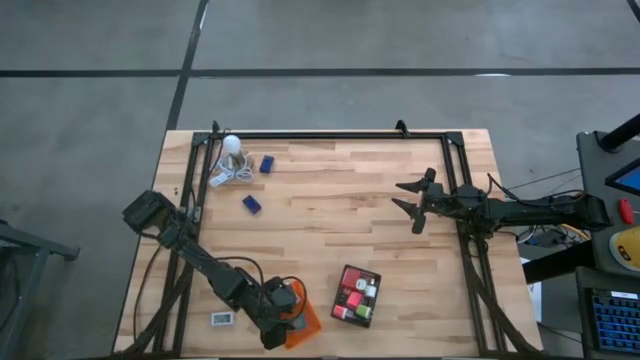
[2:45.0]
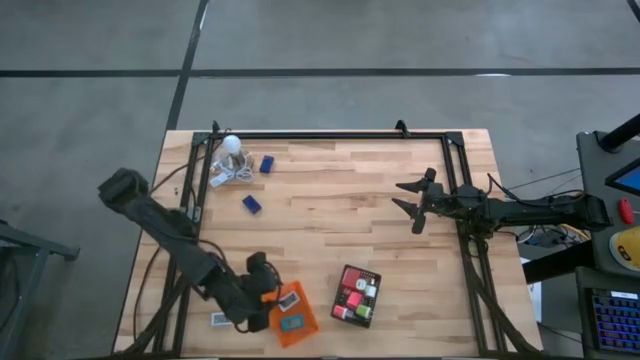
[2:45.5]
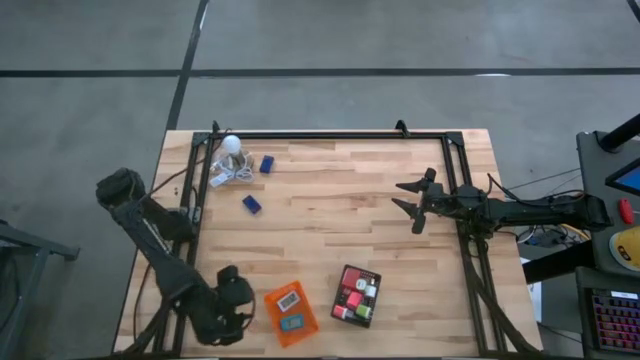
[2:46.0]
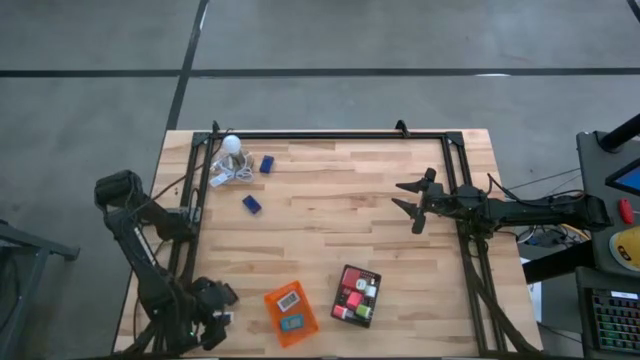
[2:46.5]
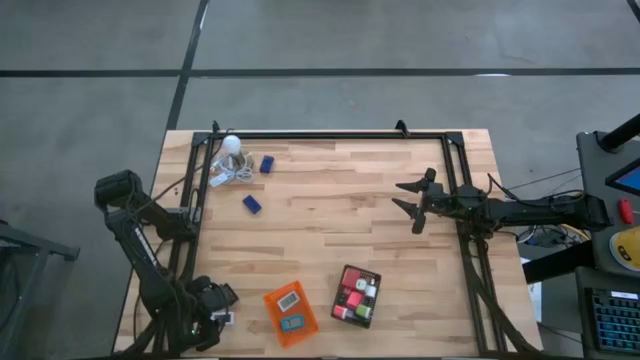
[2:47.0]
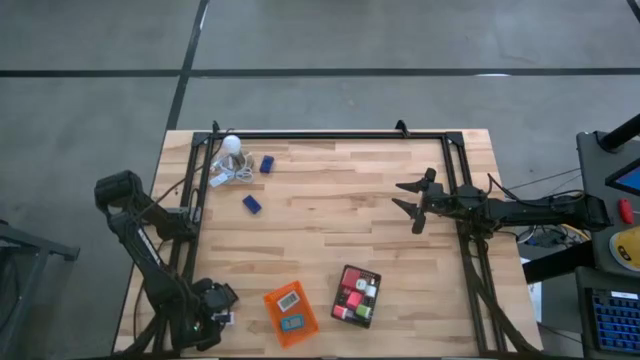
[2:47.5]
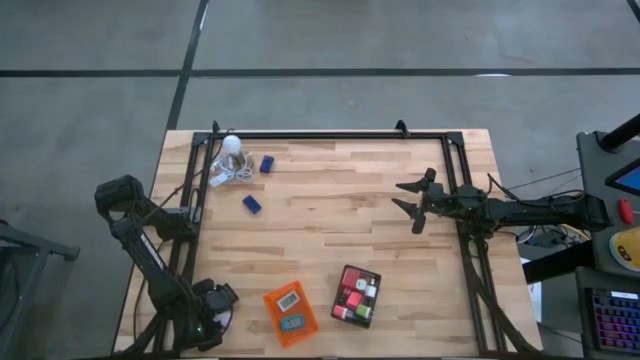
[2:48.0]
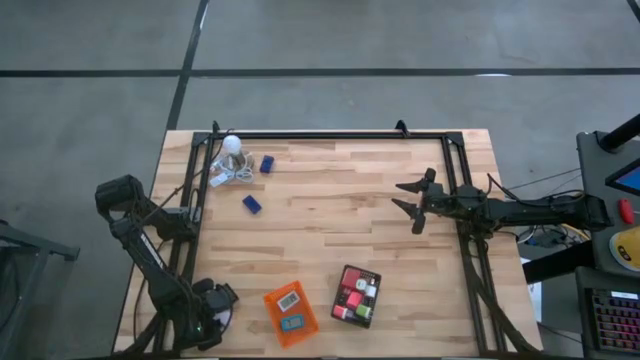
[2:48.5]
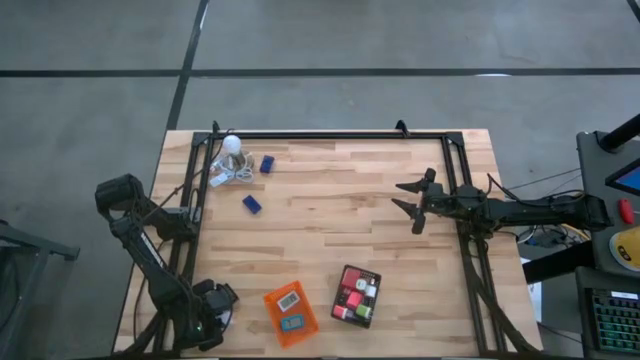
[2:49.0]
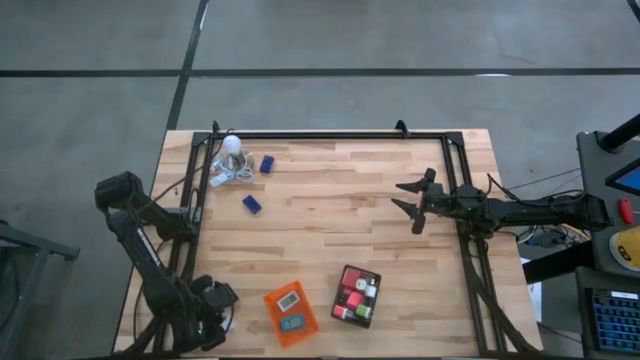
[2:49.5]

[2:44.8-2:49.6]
Task: Pick & Place Office items
Put the white timer into the orange bin

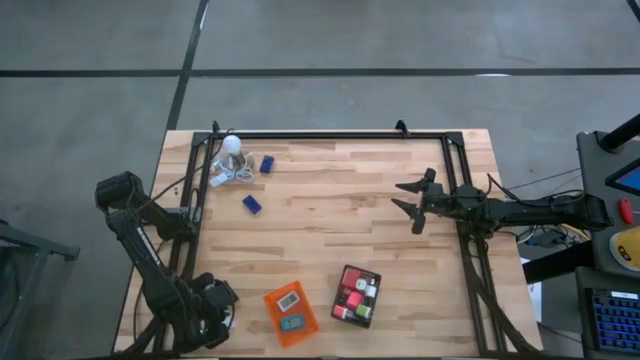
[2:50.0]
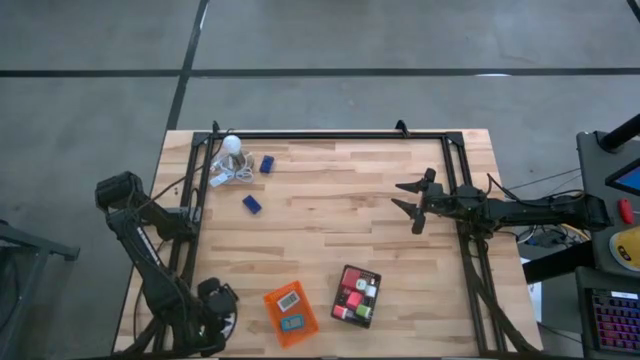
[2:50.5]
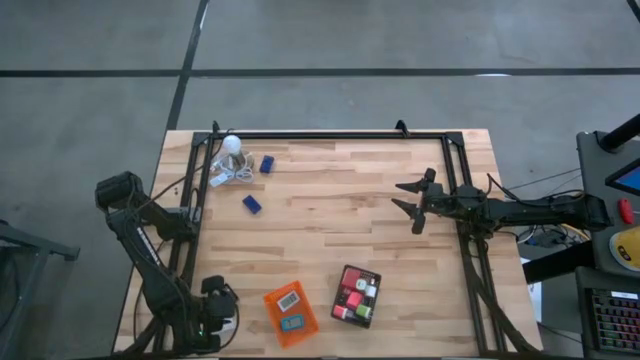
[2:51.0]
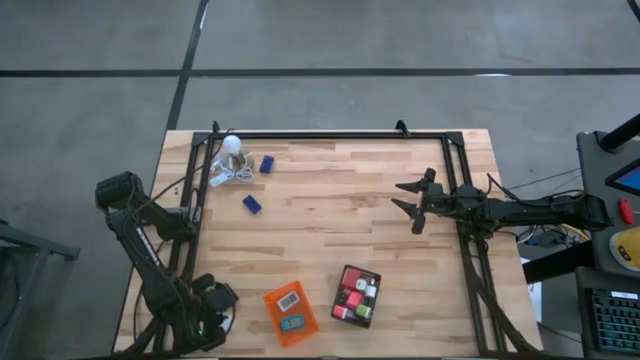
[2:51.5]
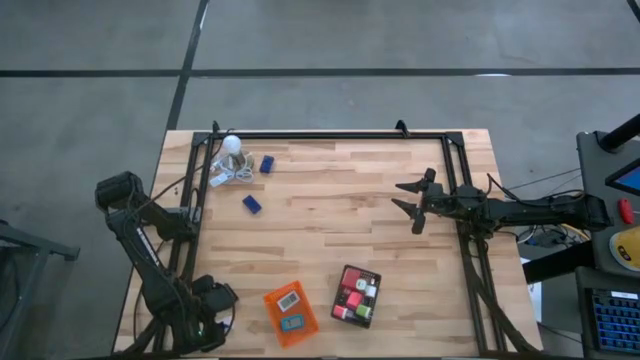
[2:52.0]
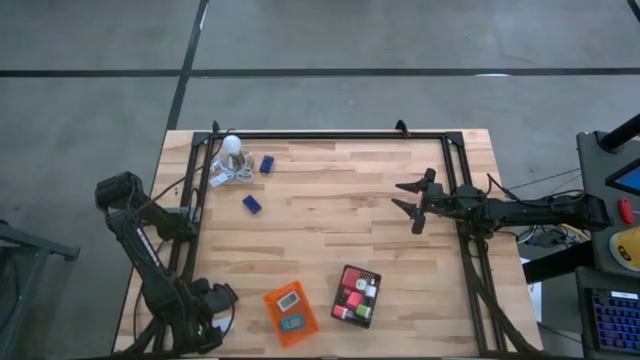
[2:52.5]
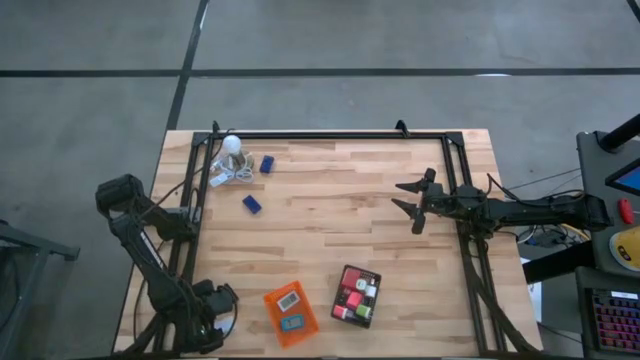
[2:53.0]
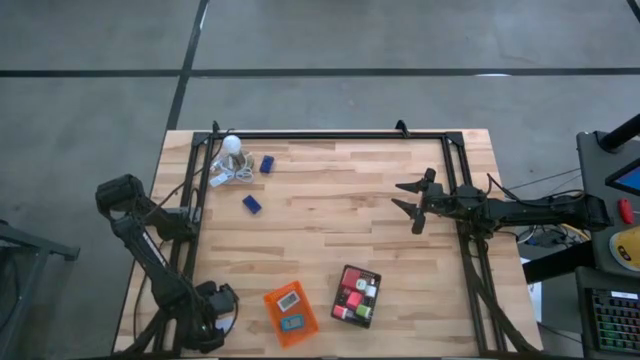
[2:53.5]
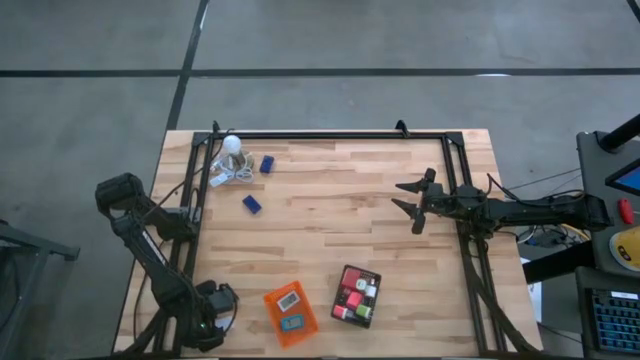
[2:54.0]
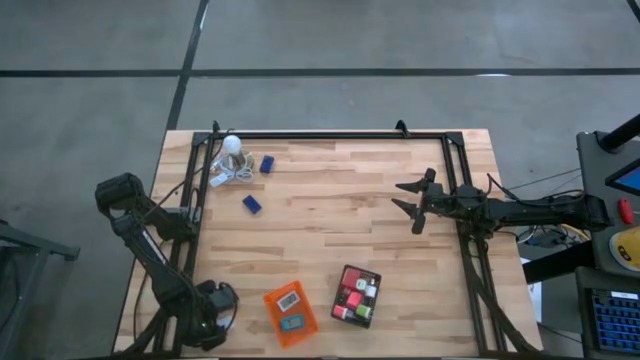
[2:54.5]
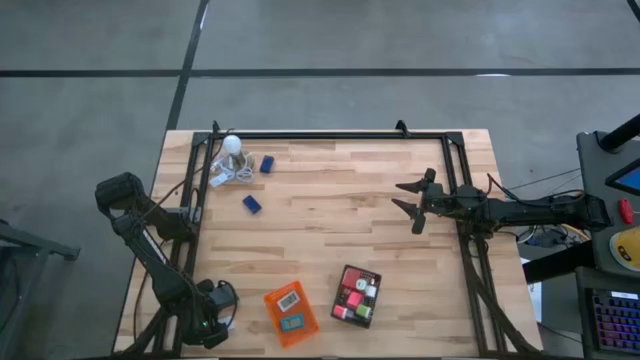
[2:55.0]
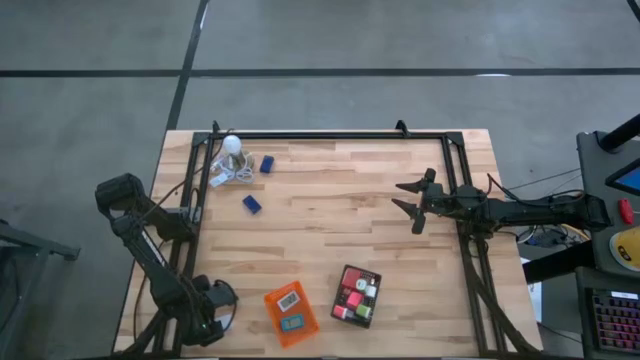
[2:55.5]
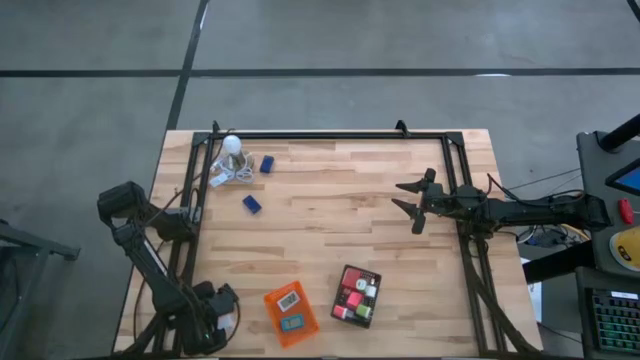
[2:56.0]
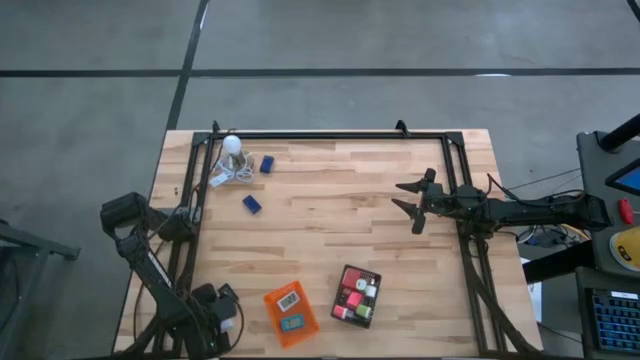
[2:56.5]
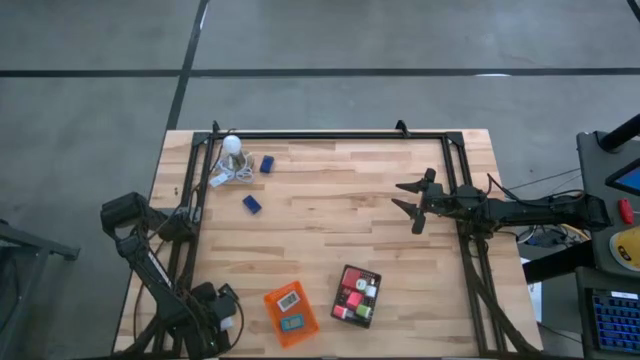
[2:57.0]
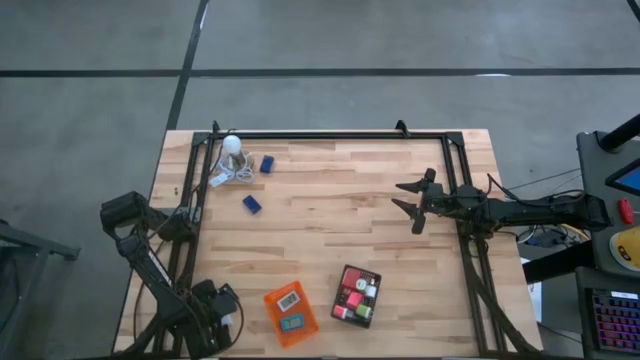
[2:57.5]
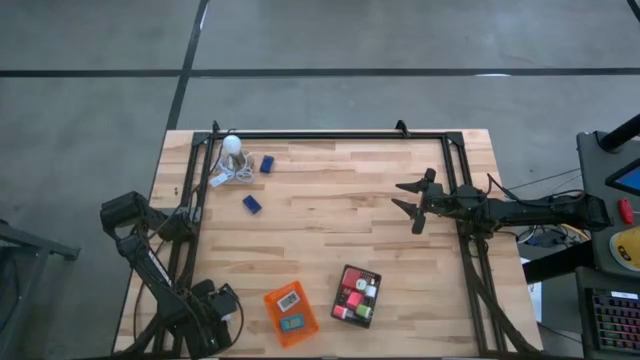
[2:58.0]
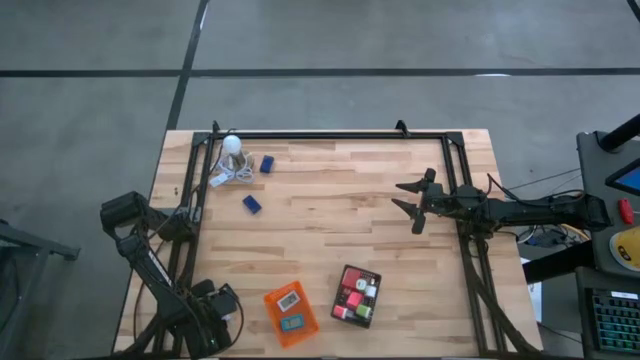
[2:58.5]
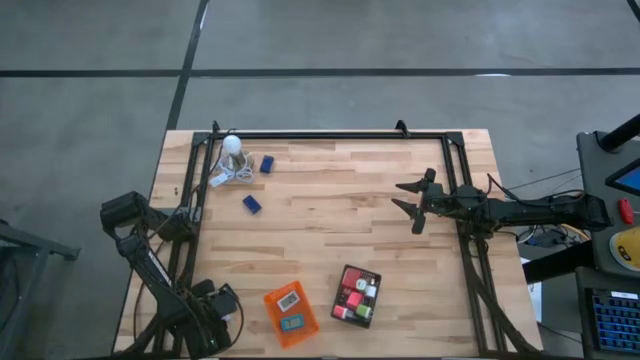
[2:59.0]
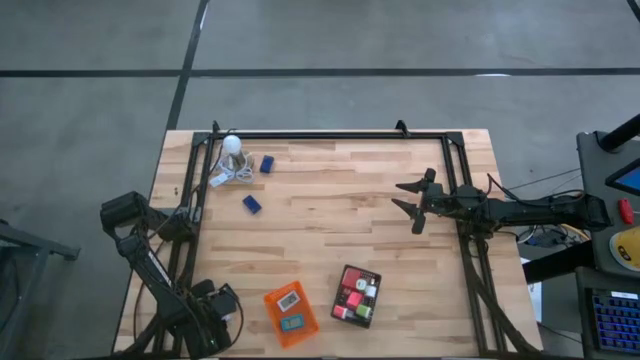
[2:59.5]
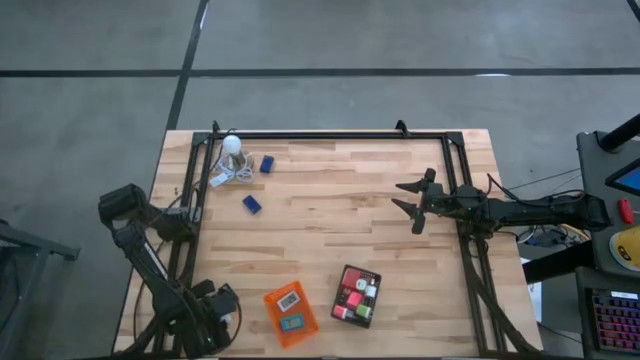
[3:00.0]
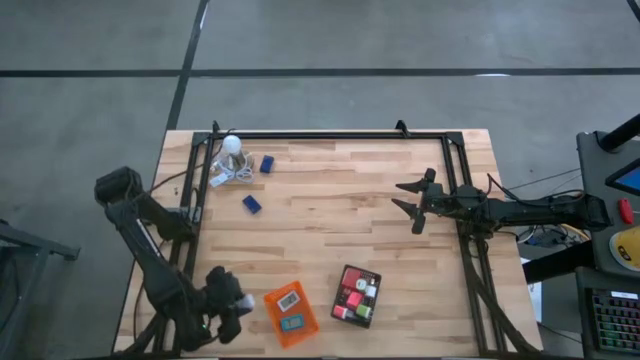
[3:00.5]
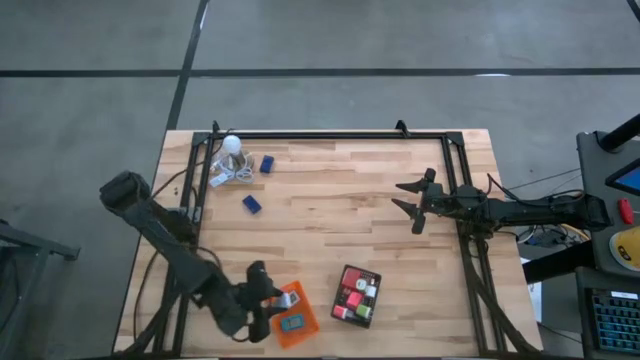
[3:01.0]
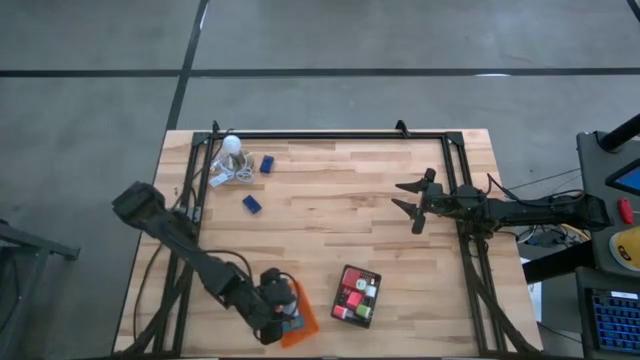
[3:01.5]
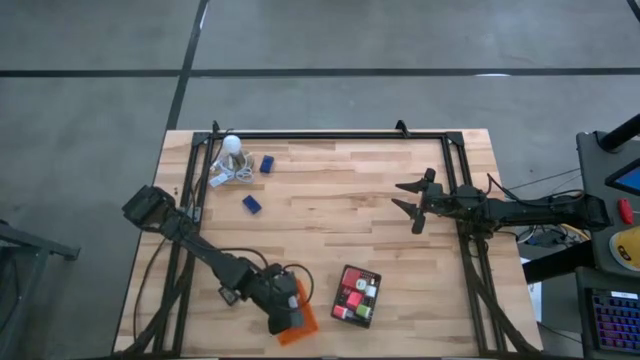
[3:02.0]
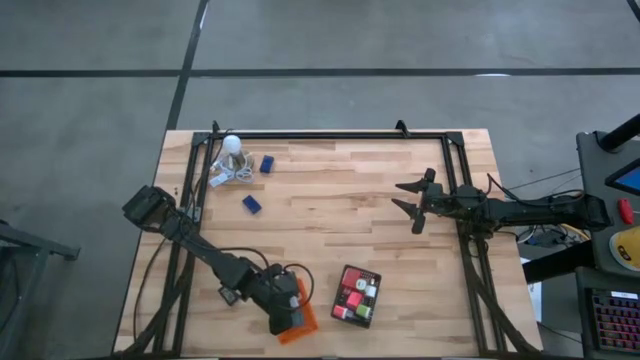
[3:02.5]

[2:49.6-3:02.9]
Put the white timer into the orange bin
